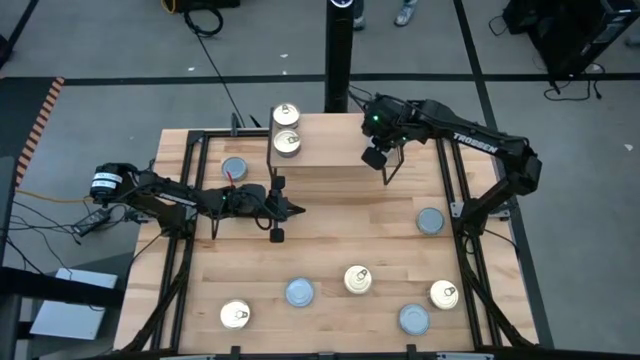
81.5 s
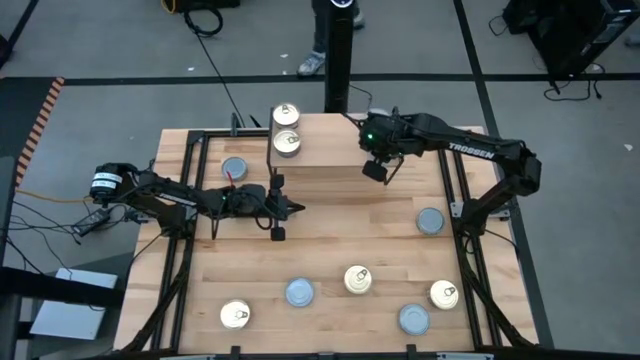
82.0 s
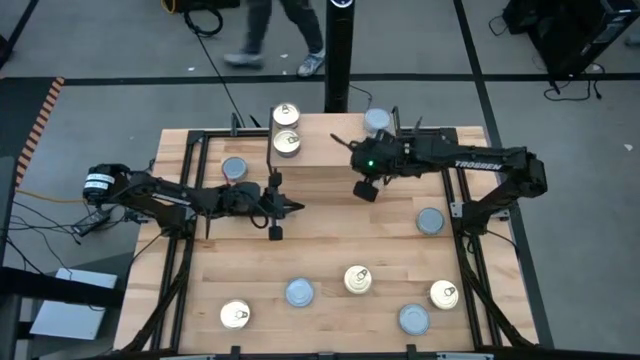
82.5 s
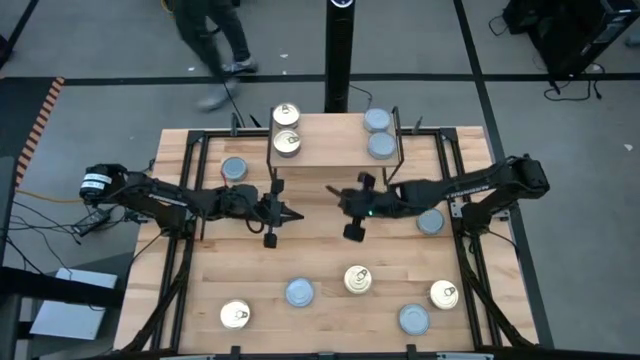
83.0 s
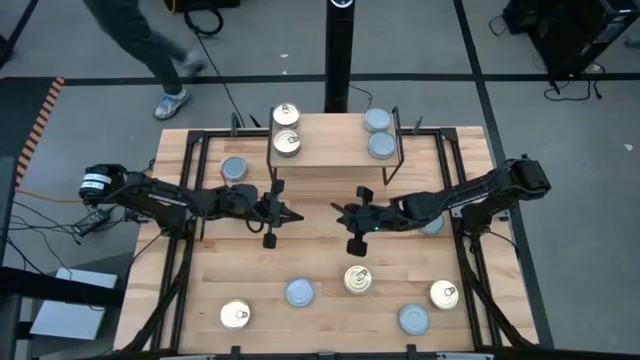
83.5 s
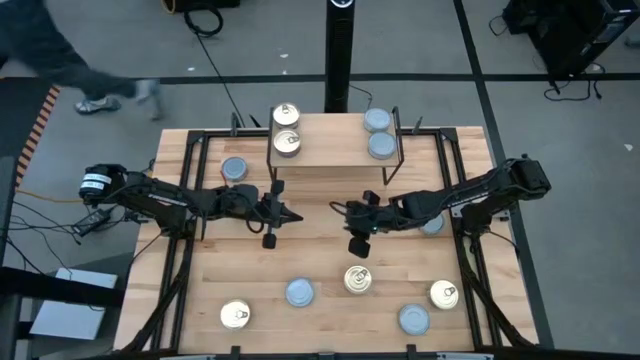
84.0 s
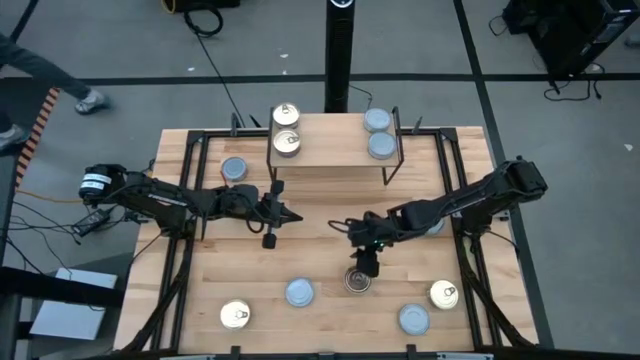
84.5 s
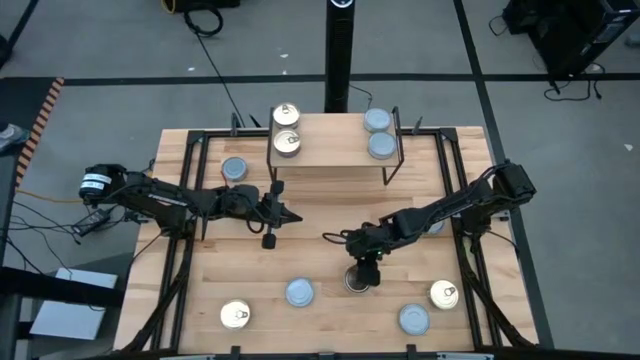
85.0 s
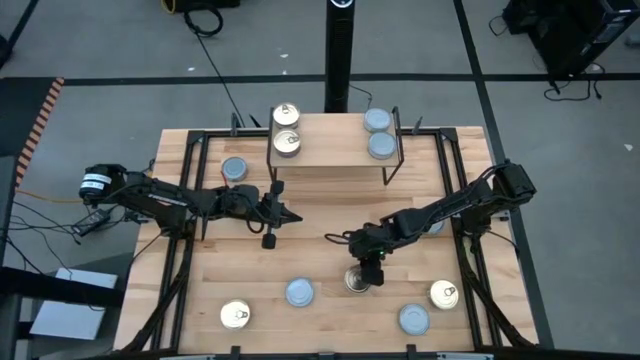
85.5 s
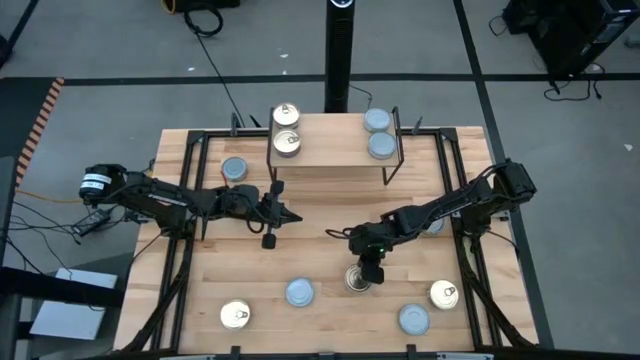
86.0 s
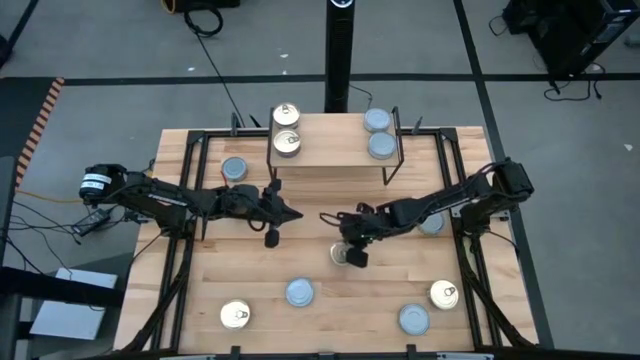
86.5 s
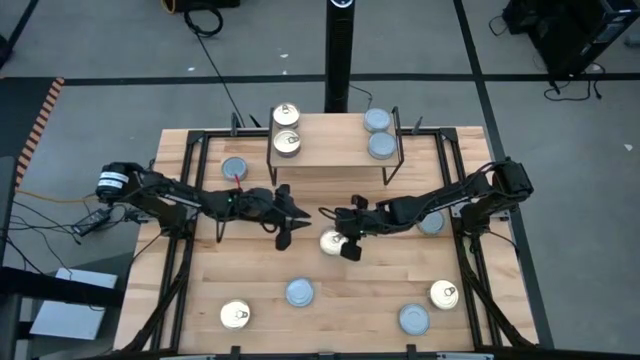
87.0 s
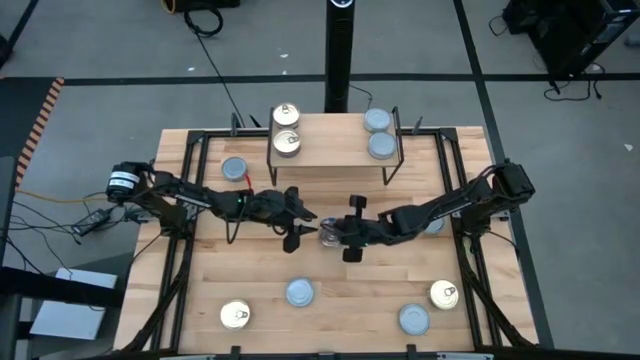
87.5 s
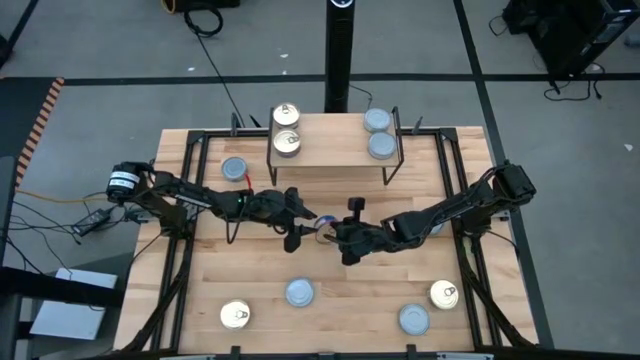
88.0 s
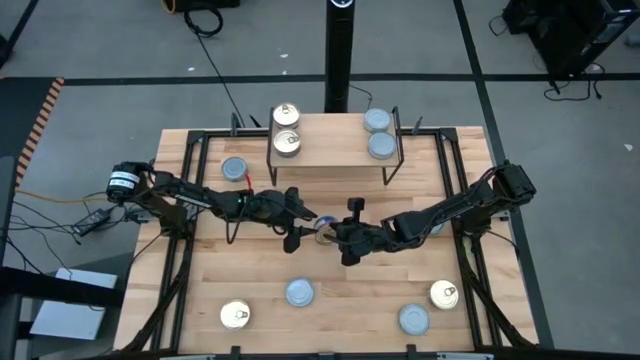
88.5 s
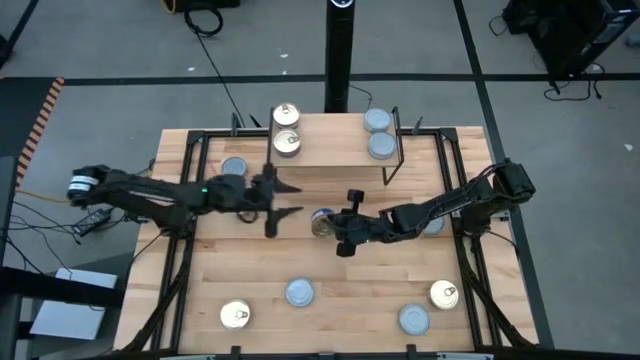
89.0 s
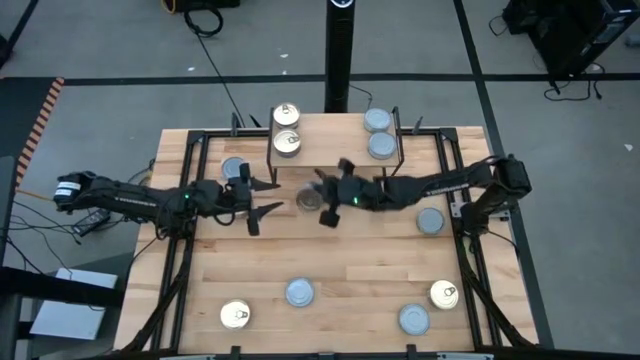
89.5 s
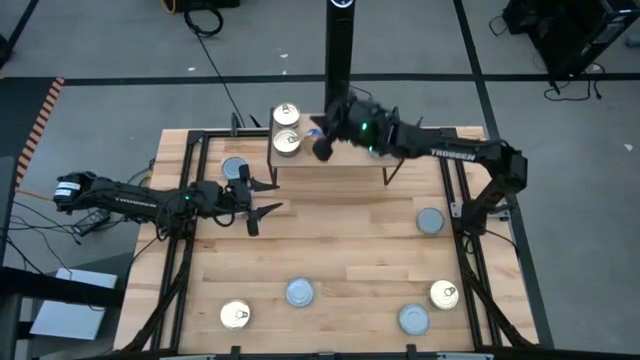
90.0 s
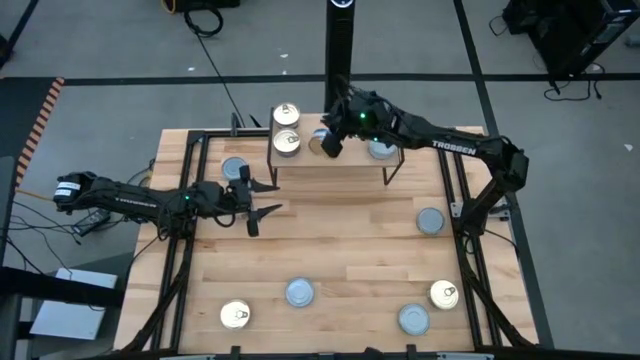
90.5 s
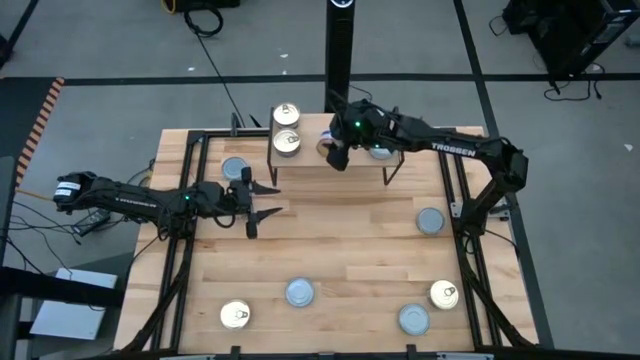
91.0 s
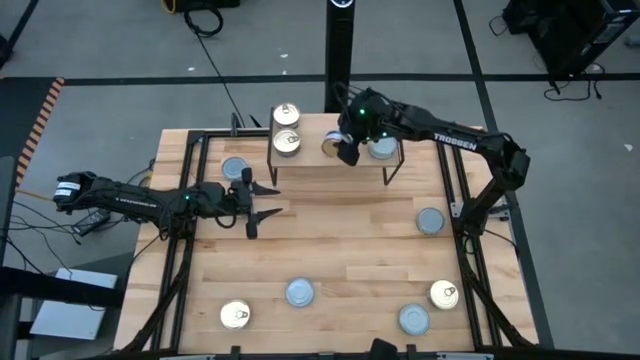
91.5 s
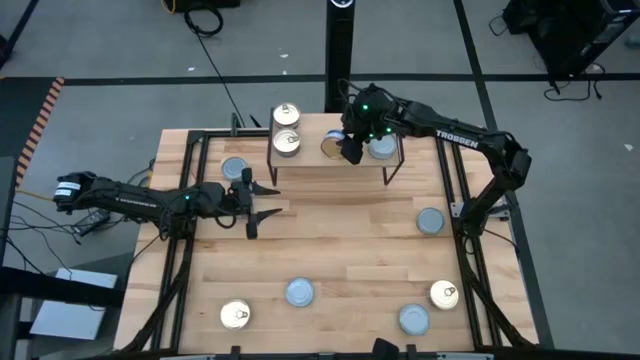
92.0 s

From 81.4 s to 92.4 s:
Task: Stack canned seafood by type on shelf
Stack the blue pink tuna can on the top blue tuna can on the shelf

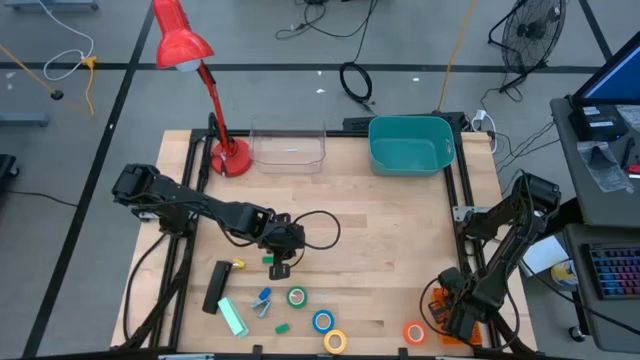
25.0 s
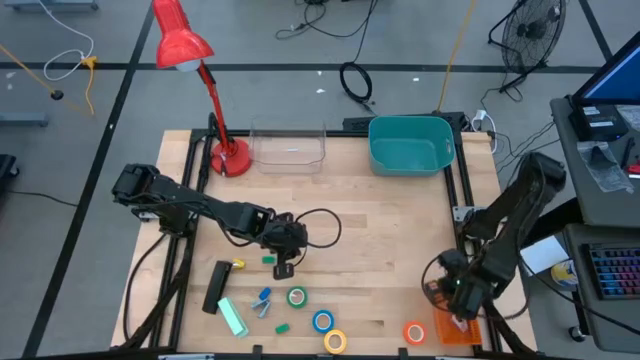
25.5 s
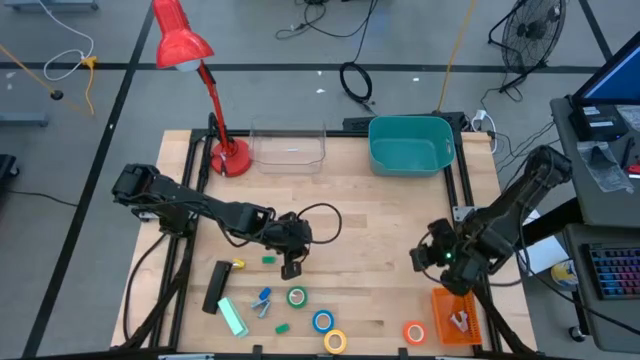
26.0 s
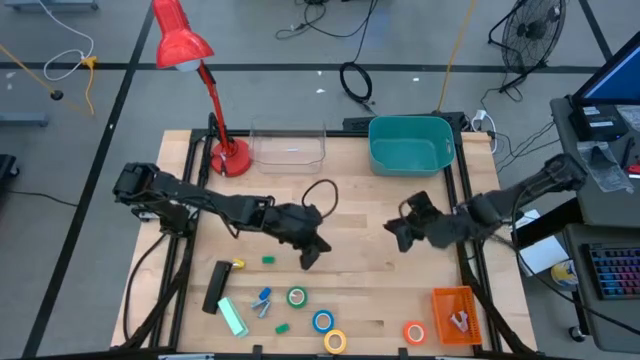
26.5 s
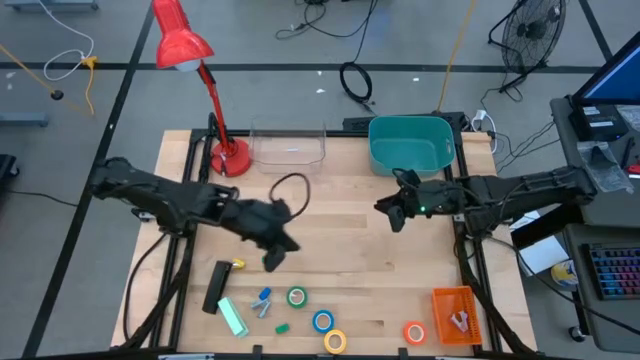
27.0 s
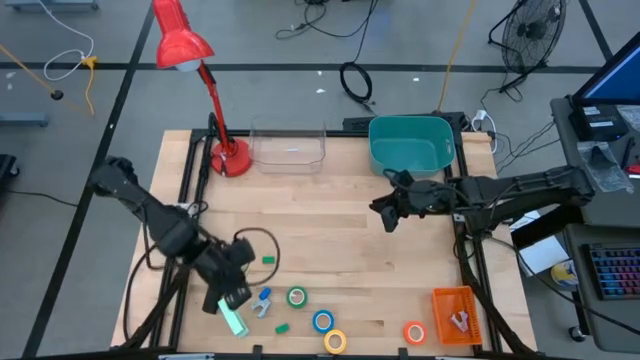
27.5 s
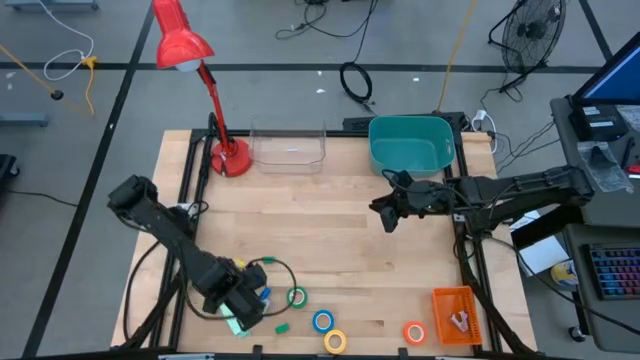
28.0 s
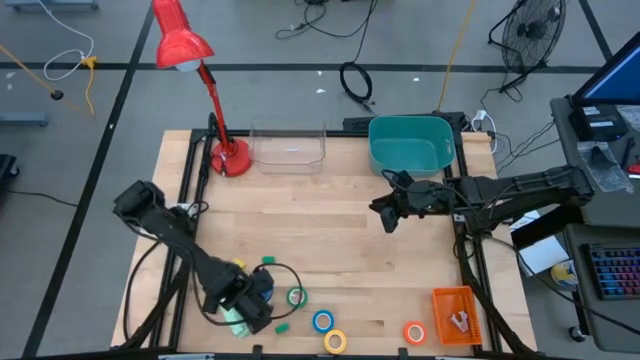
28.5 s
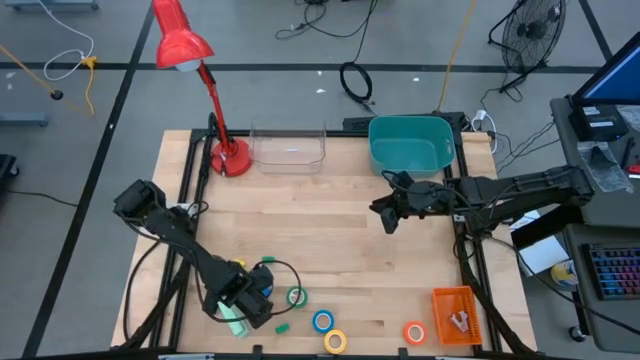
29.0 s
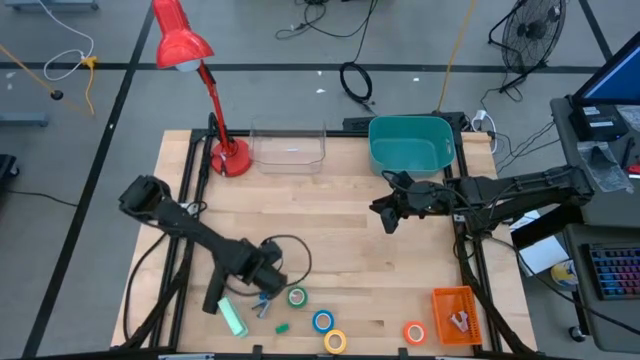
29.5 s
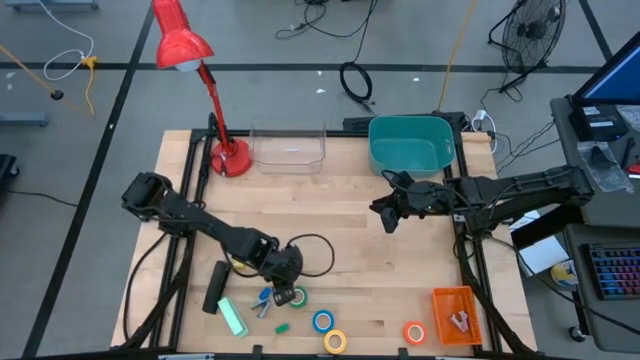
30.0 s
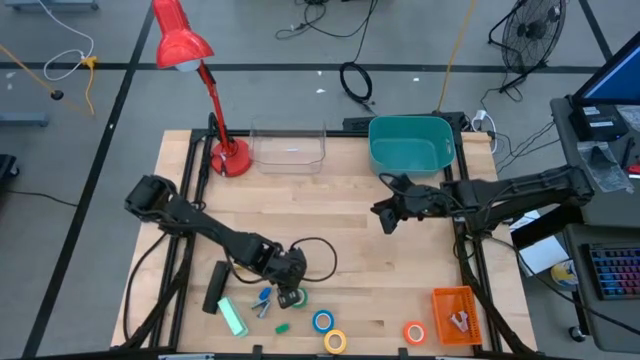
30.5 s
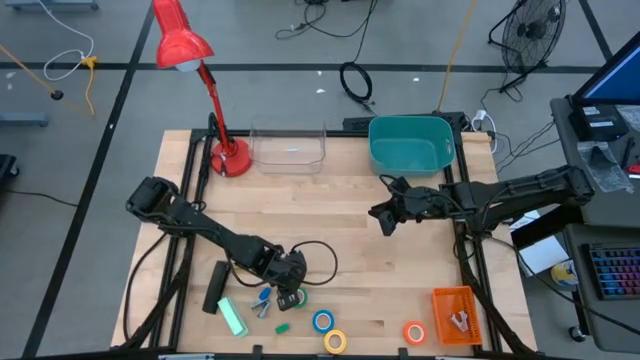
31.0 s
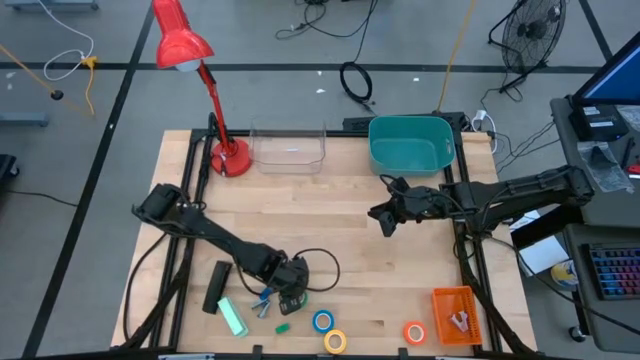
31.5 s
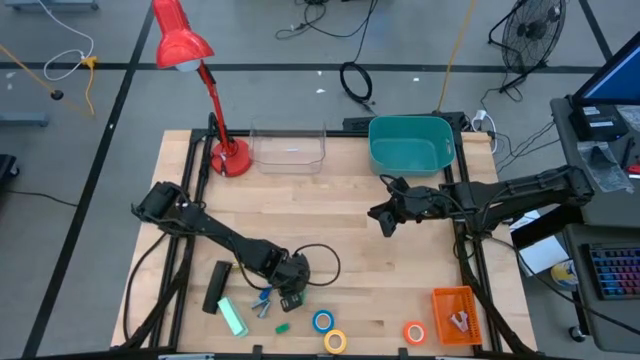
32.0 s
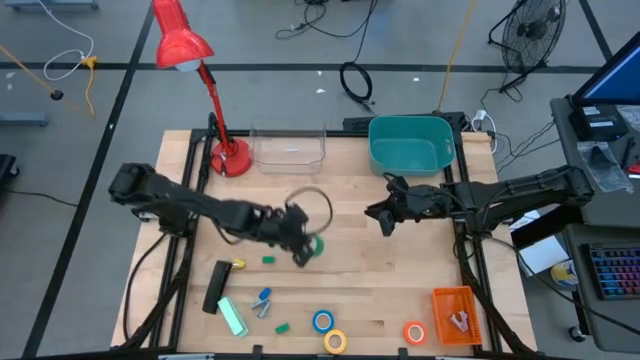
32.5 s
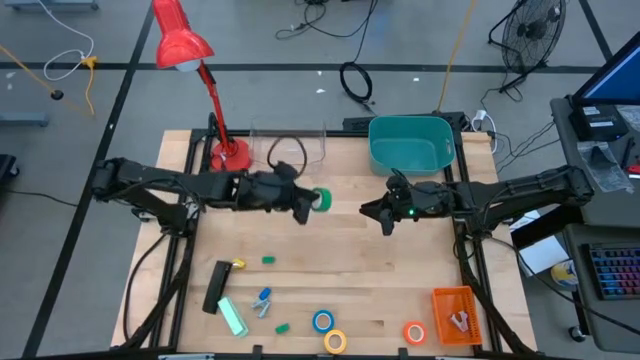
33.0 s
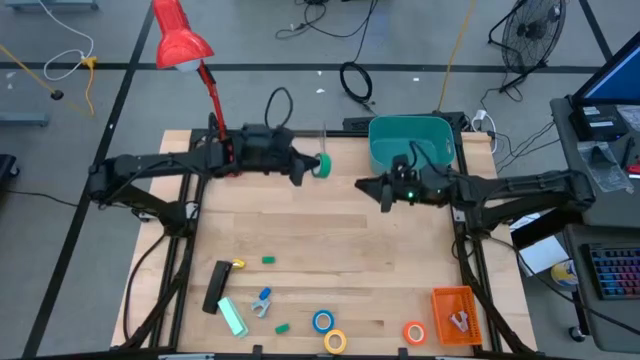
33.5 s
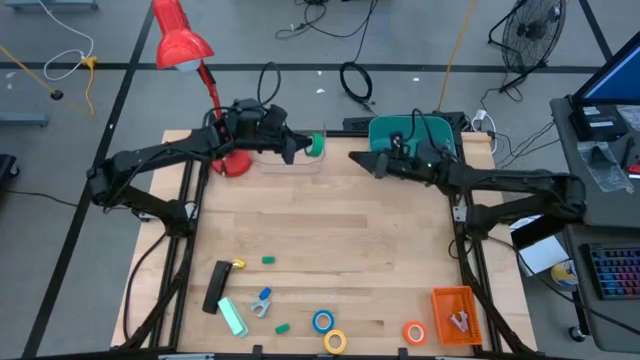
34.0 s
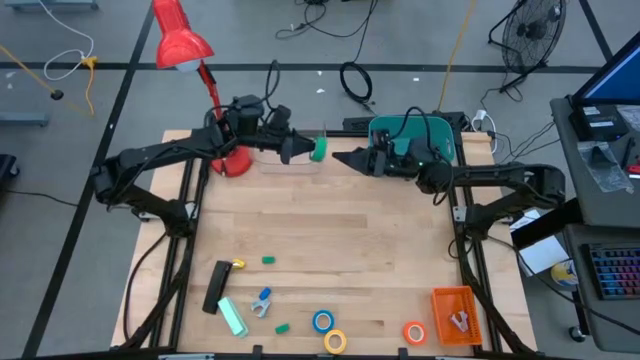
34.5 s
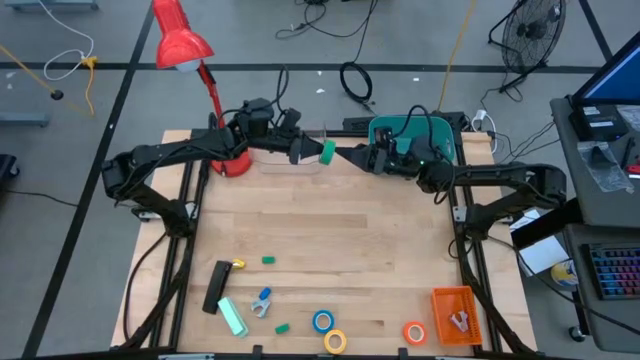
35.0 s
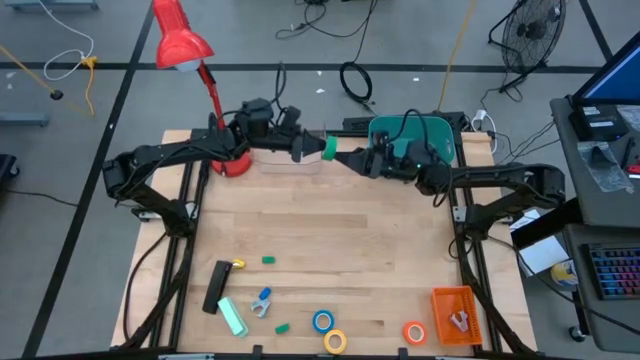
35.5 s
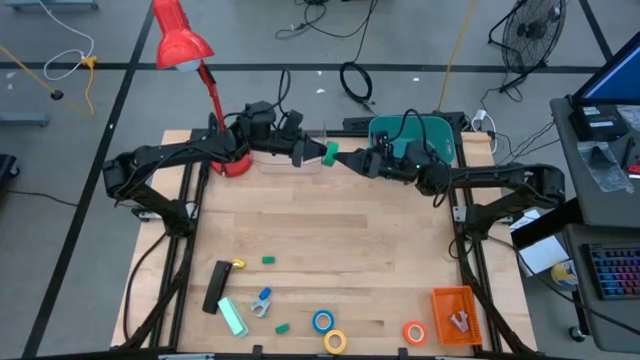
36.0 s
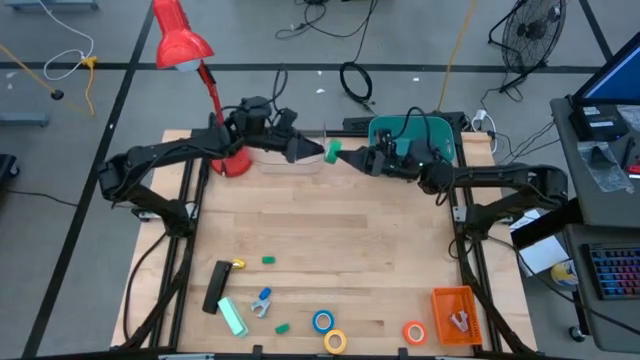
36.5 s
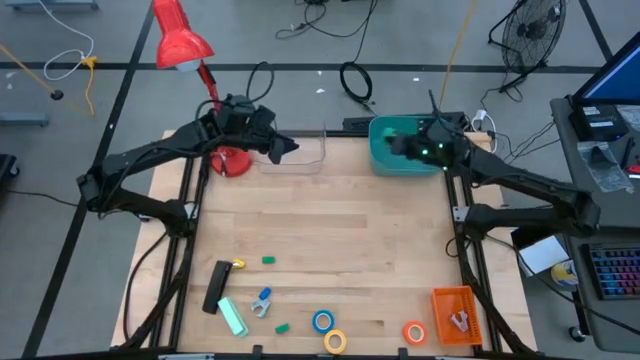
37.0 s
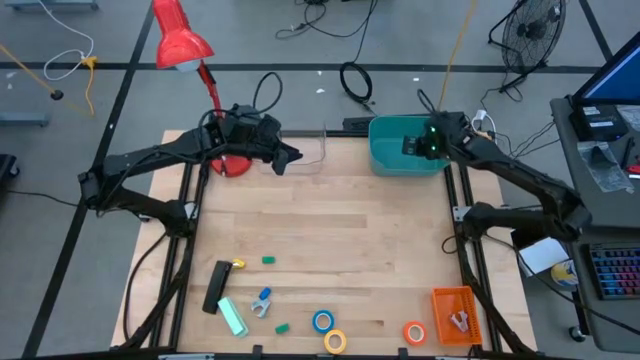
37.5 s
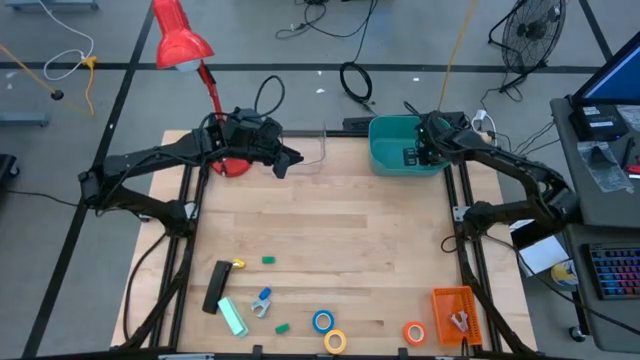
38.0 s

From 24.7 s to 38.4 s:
Task: Pick and place Stapler, Stapler remover, tape
Put the green tape into the blue bin
